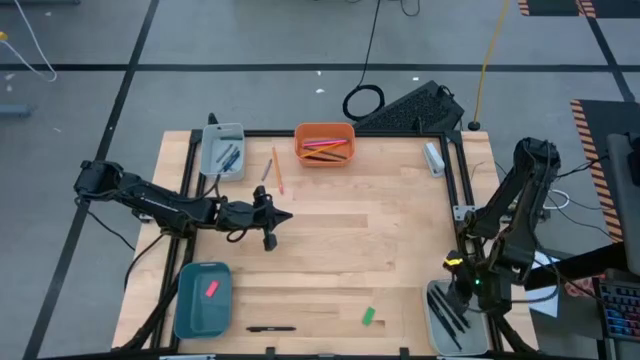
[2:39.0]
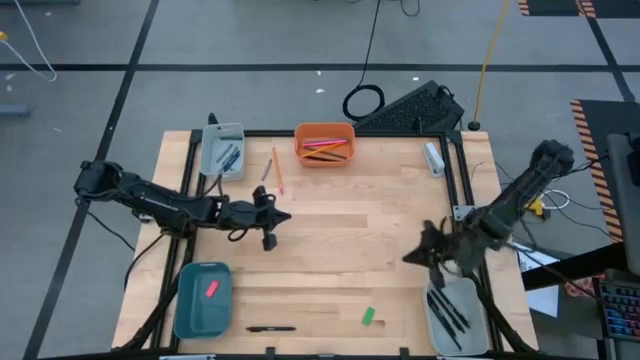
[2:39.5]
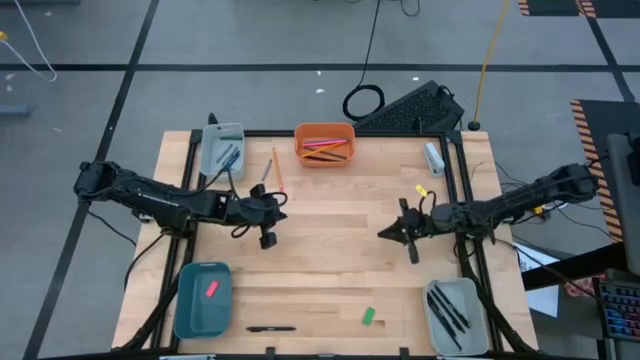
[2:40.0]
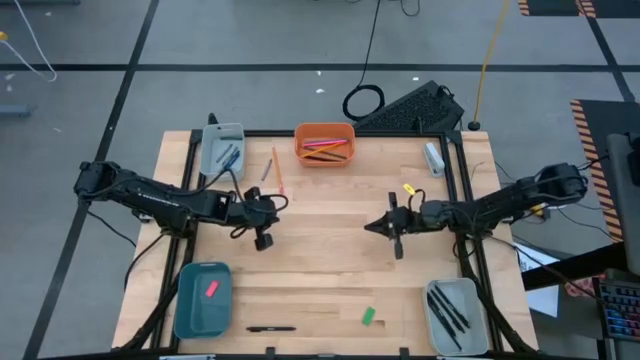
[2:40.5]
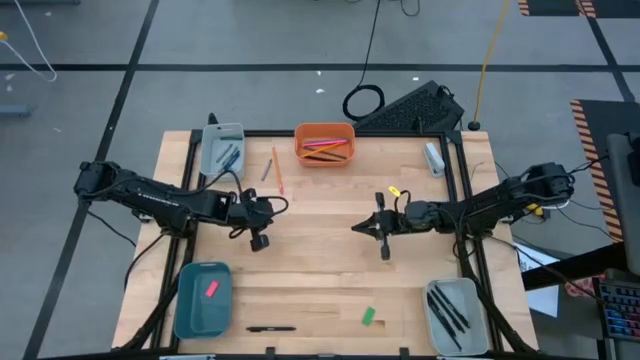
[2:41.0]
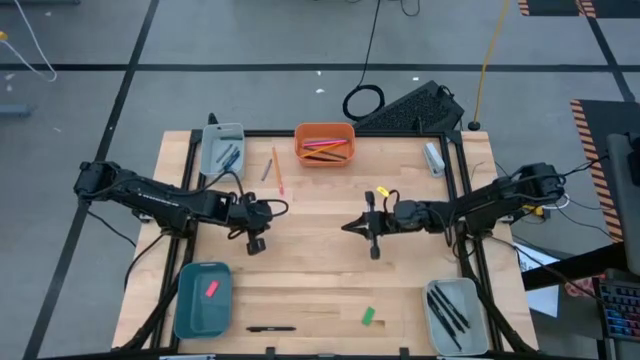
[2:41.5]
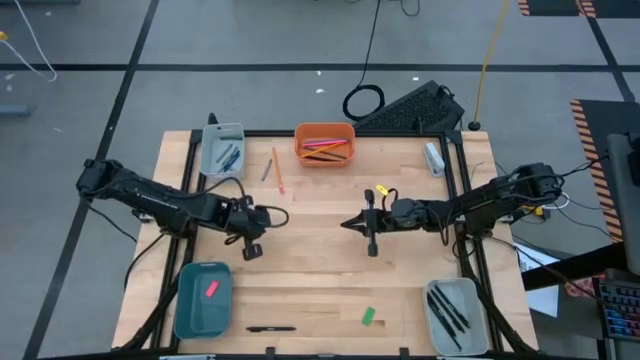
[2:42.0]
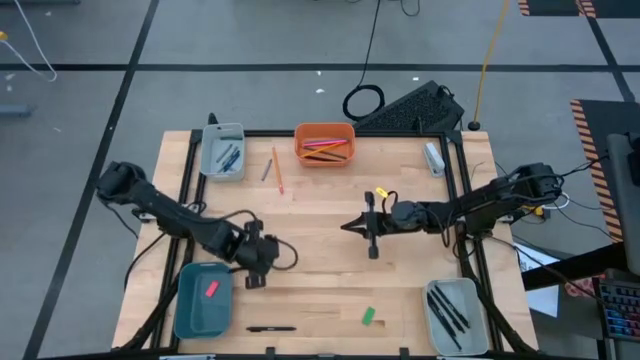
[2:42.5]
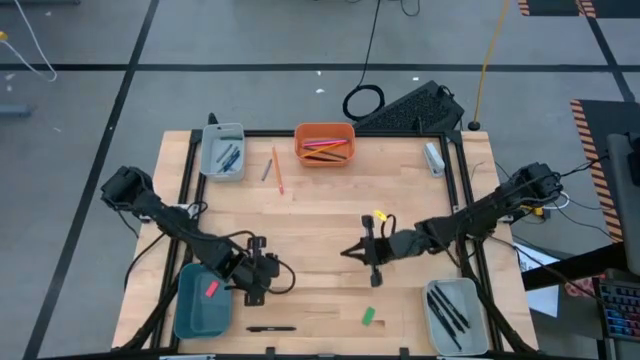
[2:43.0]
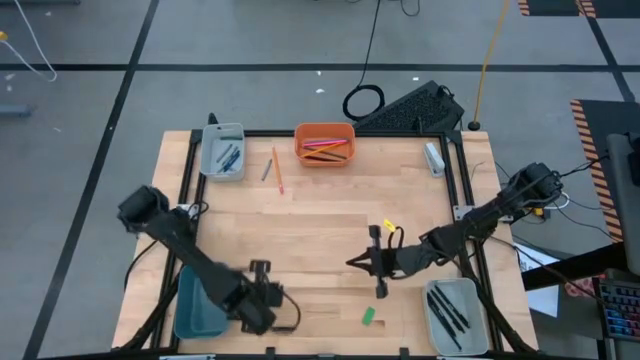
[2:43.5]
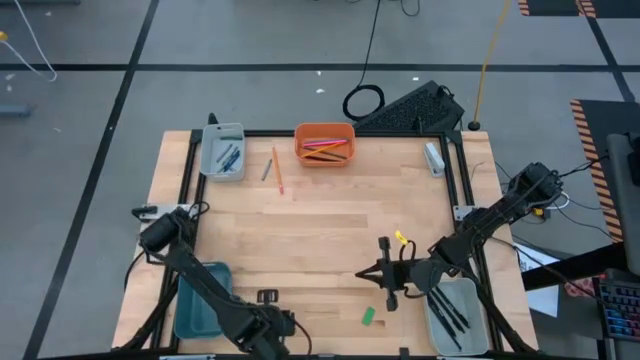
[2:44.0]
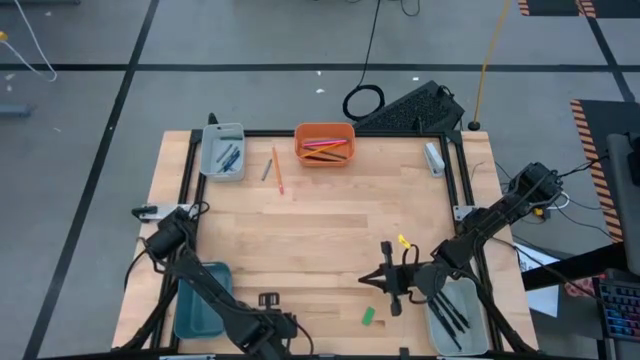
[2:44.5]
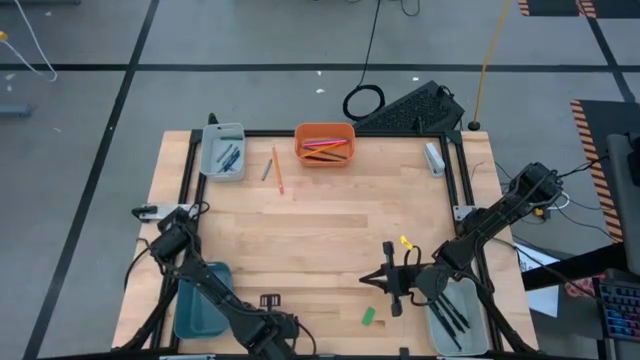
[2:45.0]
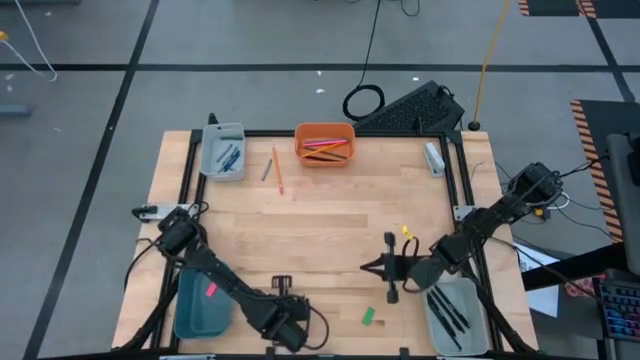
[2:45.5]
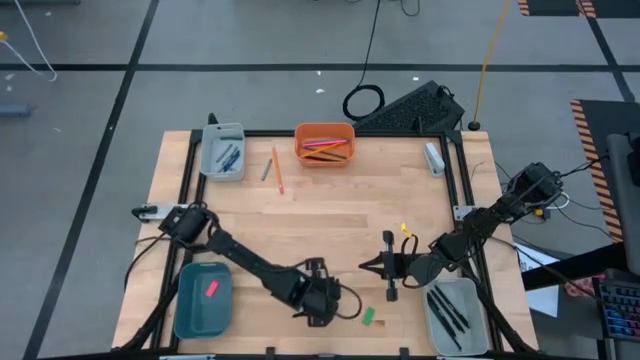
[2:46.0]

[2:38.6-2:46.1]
Task: Sort crayons/erasers/pens/pencils in bins
Put the black pen into the bottom gray bin

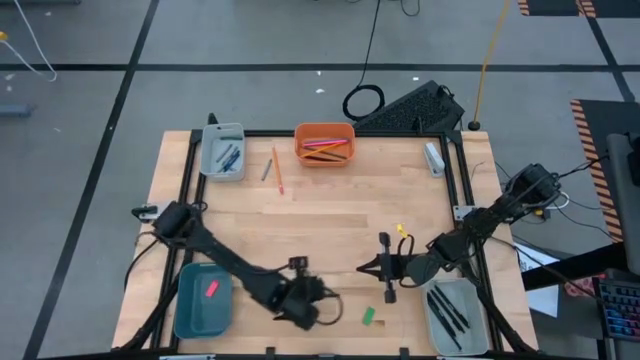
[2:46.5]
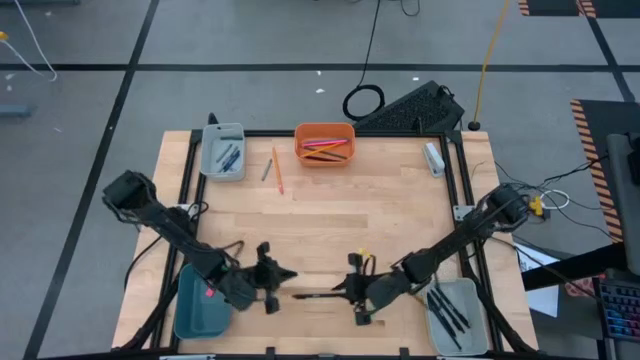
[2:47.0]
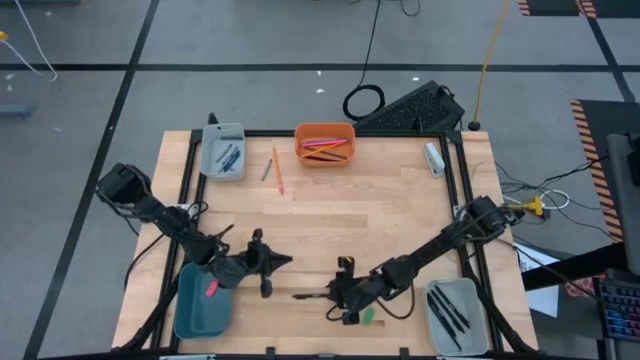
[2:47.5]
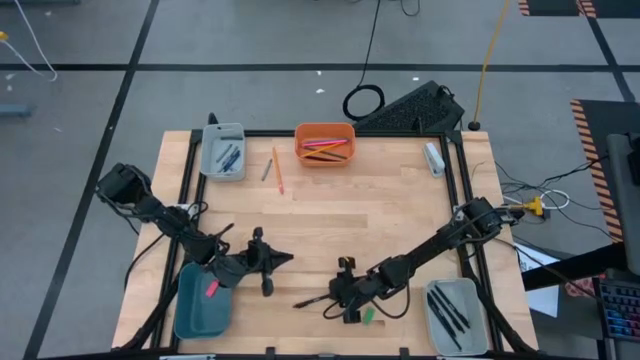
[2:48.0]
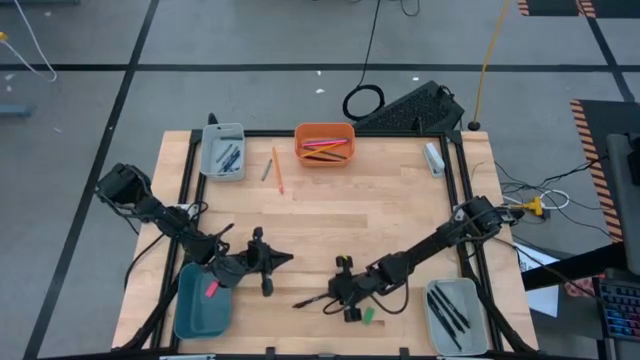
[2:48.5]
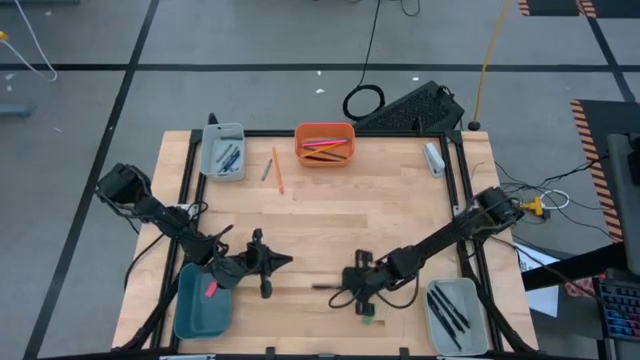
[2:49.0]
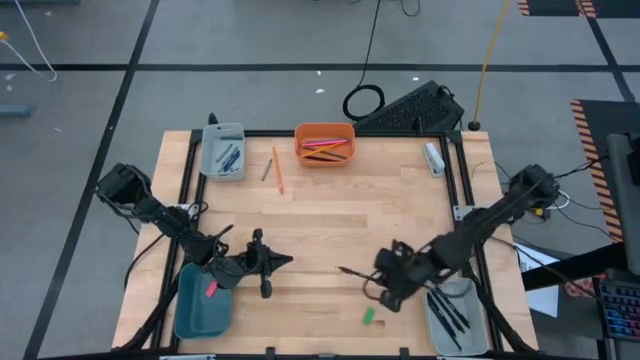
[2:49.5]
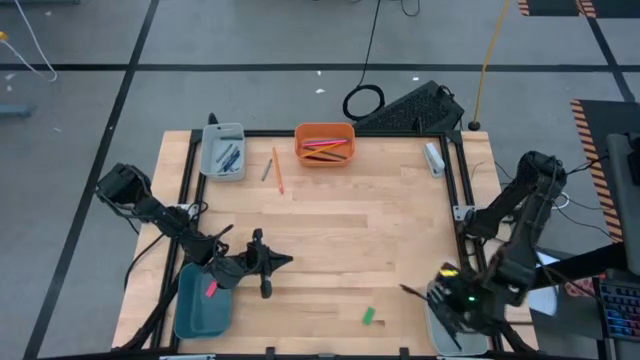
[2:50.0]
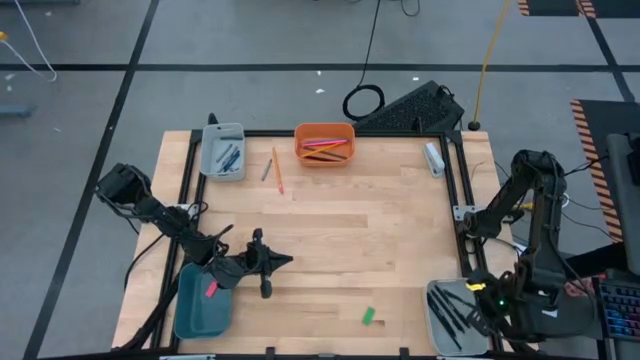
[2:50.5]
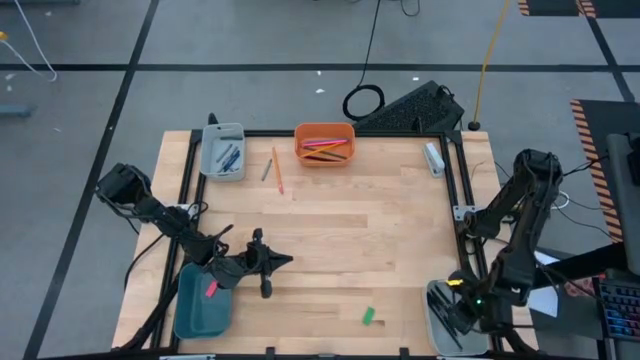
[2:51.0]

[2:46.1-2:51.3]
Put the black pen into the bottom gray bin

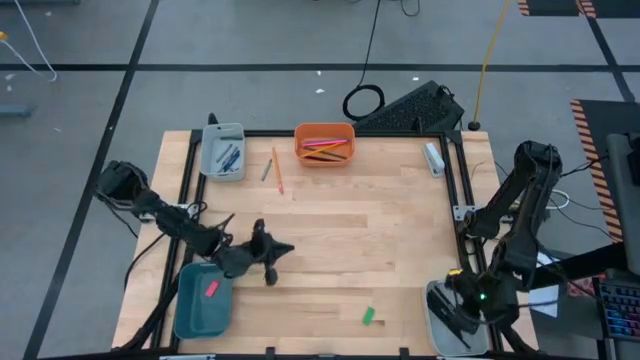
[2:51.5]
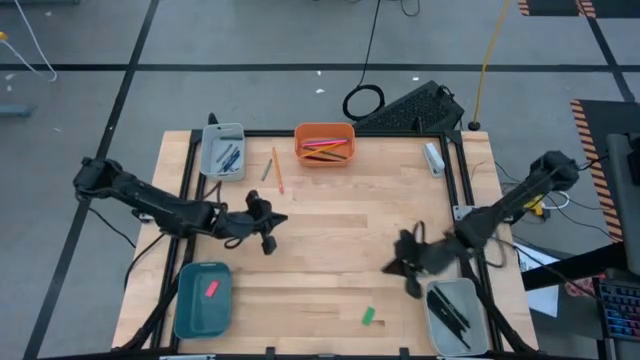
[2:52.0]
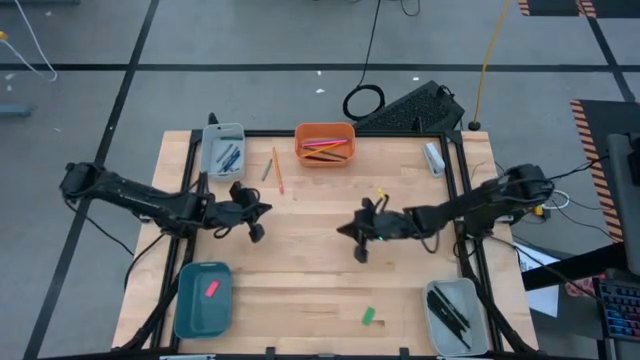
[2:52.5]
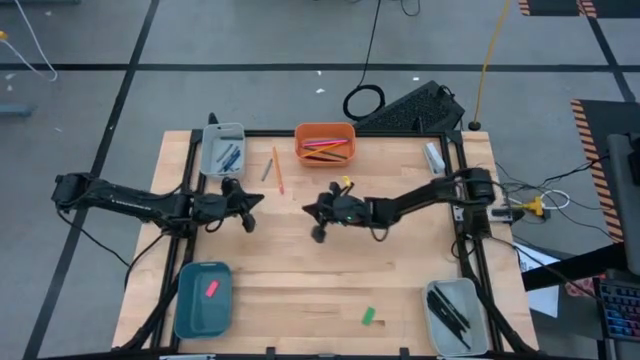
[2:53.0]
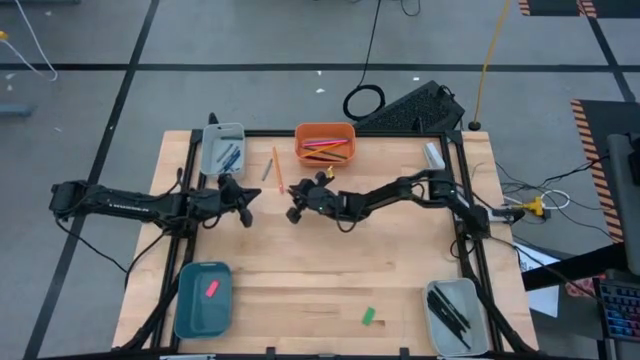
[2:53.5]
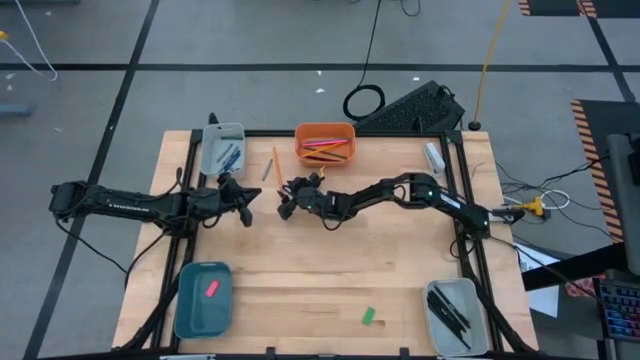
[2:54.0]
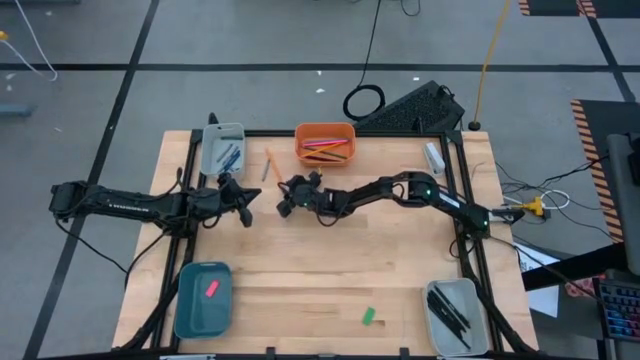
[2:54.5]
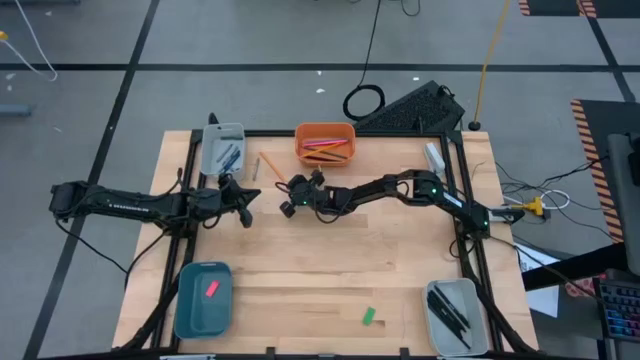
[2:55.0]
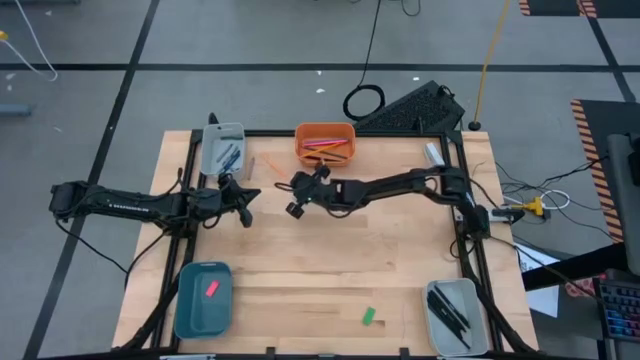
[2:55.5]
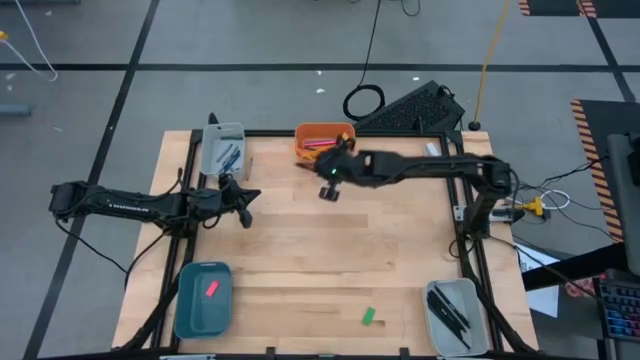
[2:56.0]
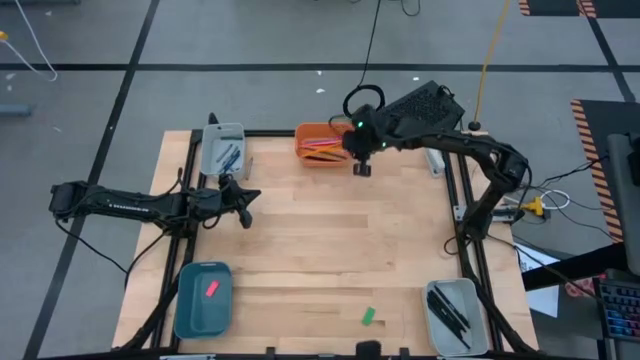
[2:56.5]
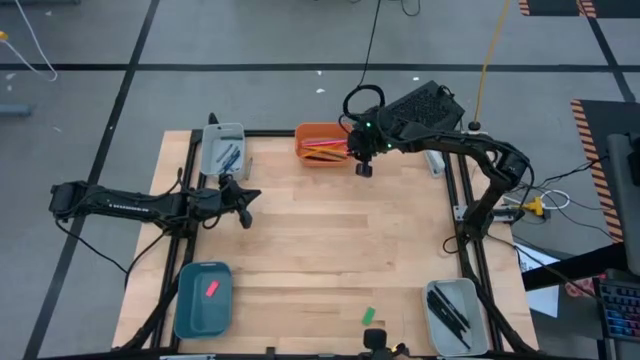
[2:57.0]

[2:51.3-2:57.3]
Put the orange pencil into the orange bin

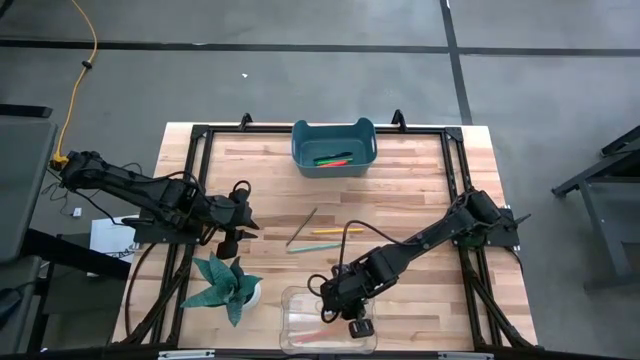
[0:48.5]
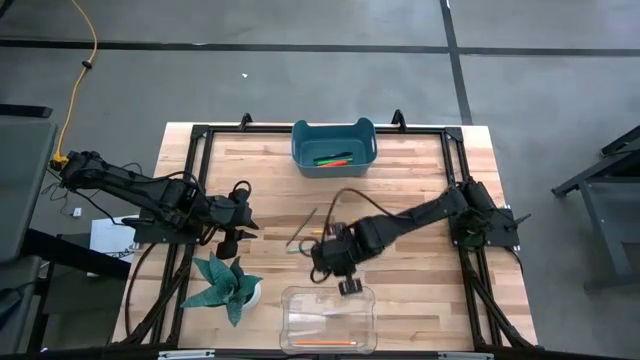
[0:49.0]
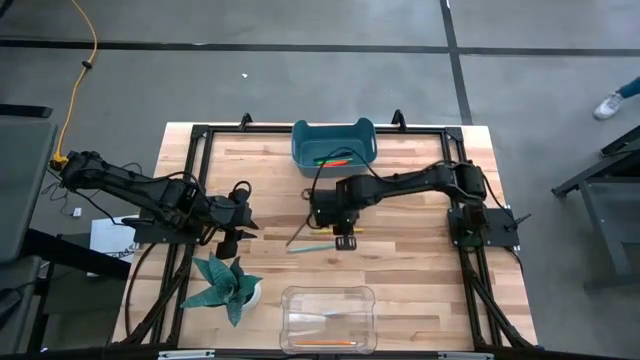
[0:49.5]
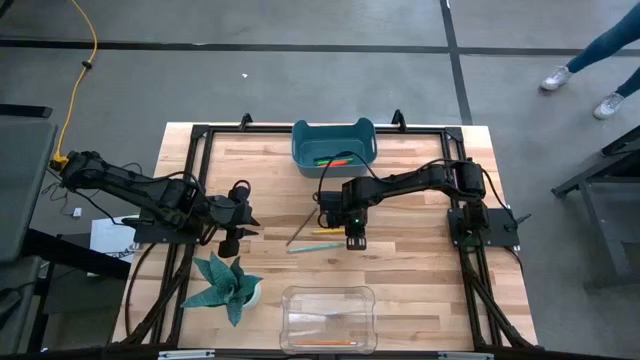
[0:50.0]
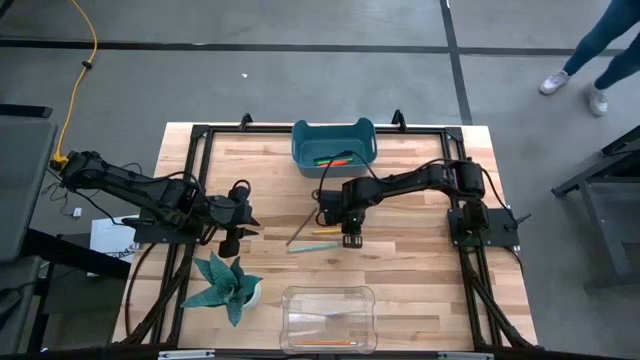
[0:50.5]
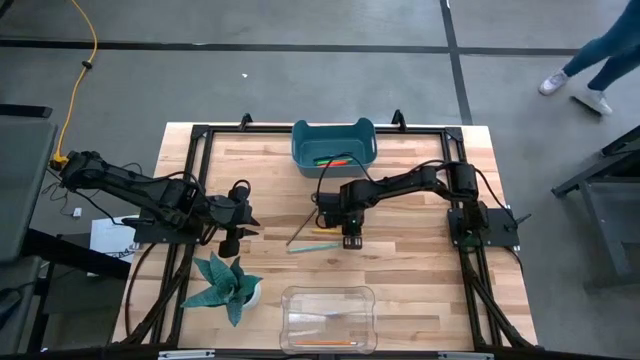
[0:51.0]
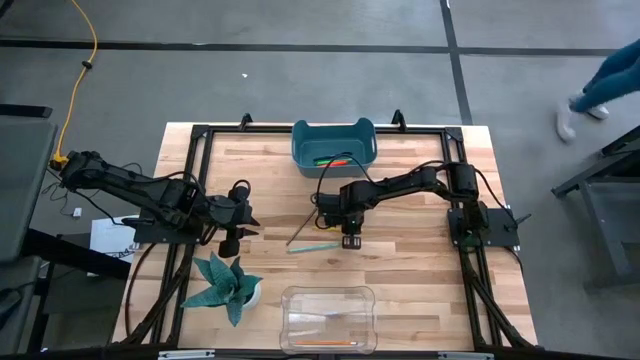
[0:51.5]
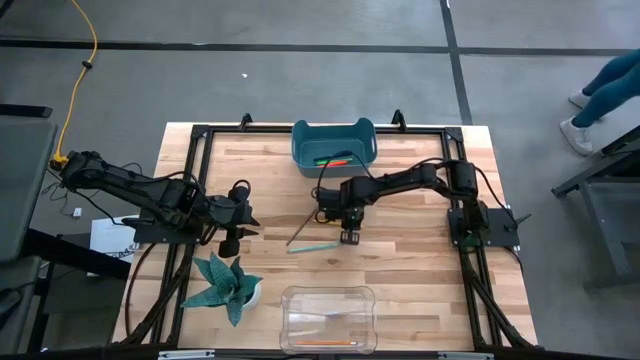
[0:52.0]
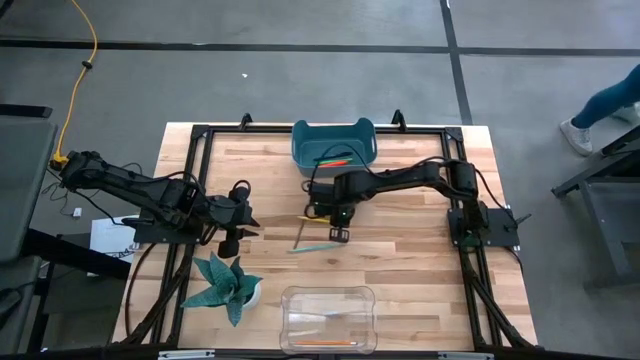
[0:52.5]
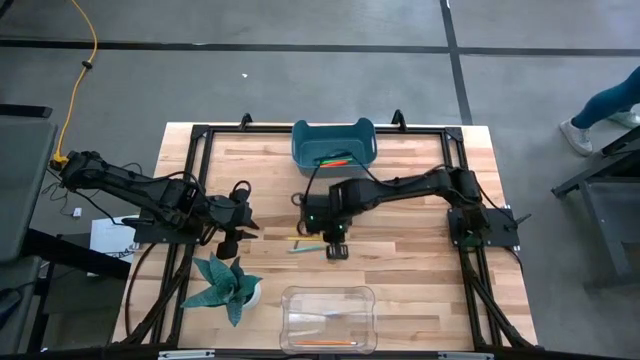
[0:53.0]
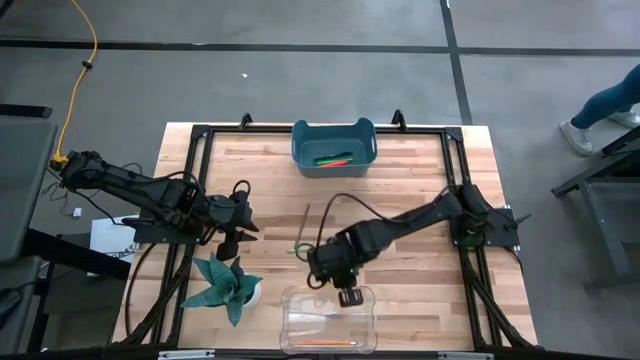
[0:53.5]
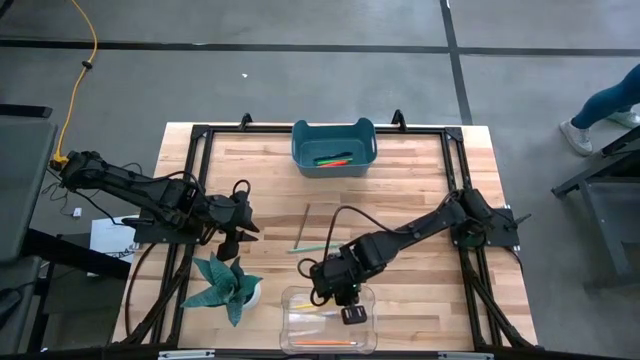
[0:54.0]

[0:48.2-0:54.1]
Task: Sort pens & pencils
Put the yellow pencil into the transparent bin
